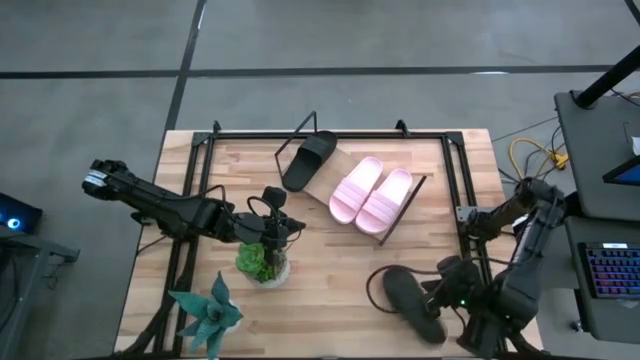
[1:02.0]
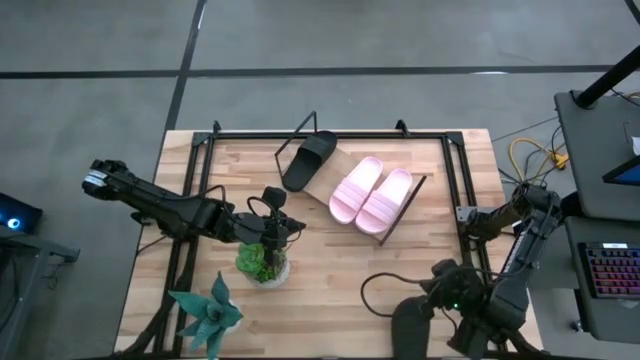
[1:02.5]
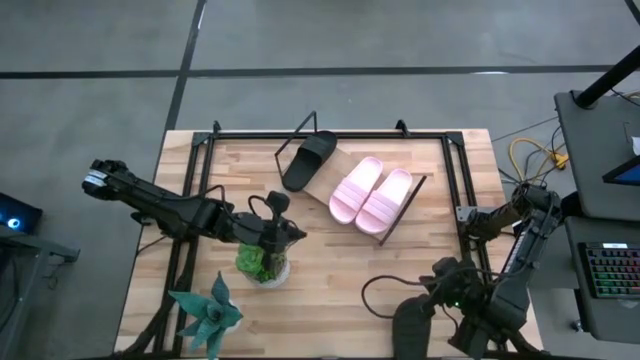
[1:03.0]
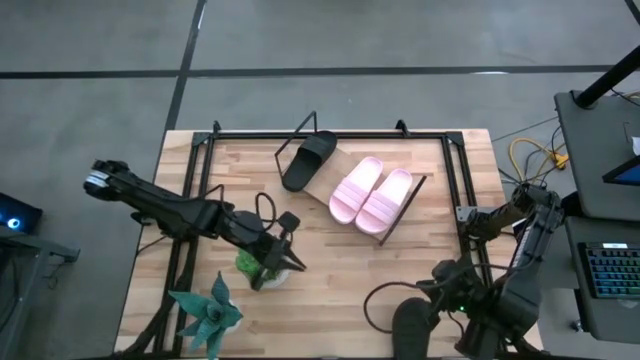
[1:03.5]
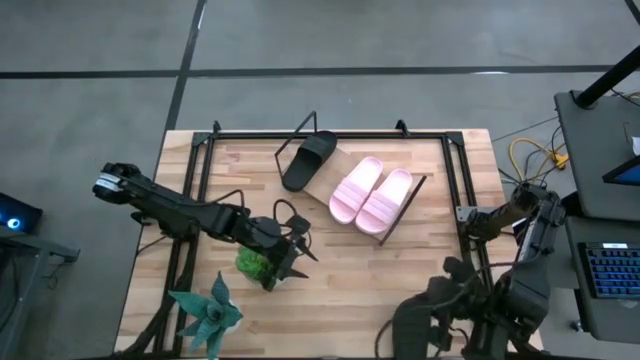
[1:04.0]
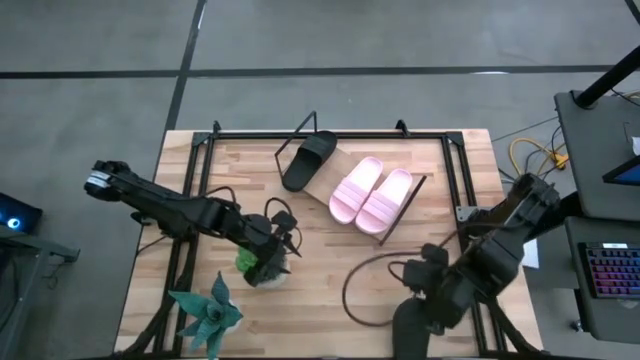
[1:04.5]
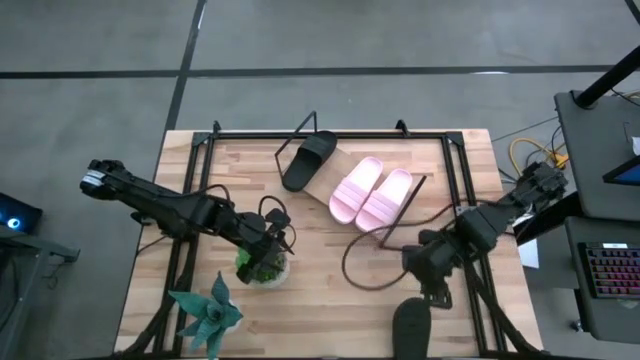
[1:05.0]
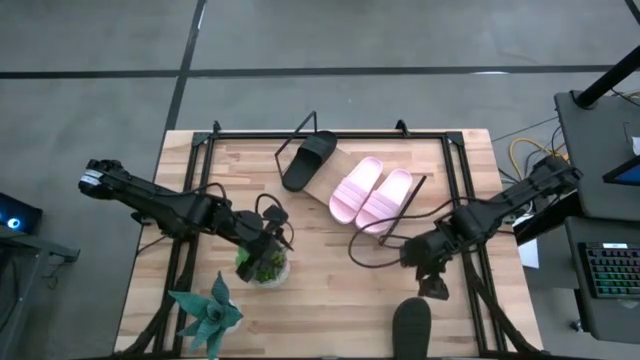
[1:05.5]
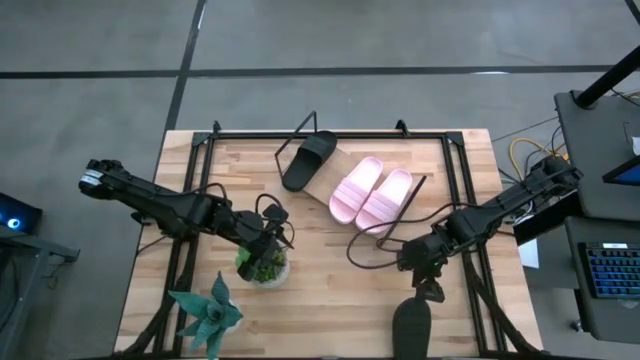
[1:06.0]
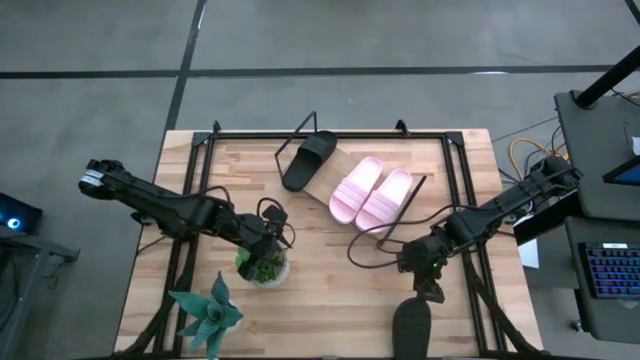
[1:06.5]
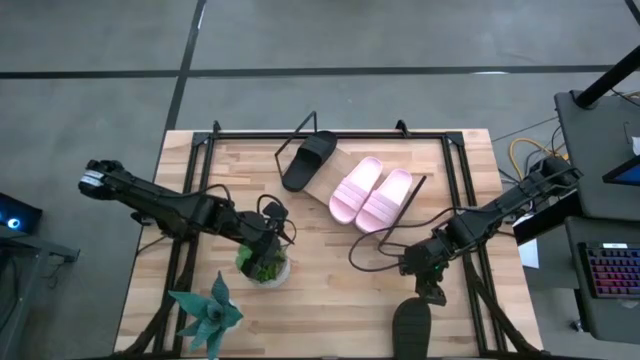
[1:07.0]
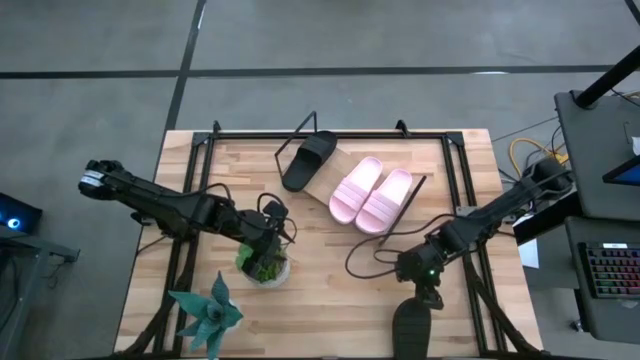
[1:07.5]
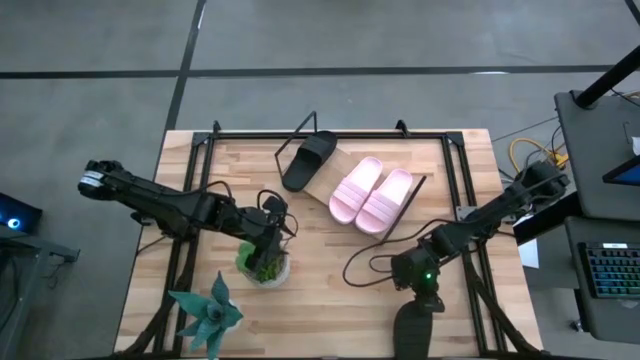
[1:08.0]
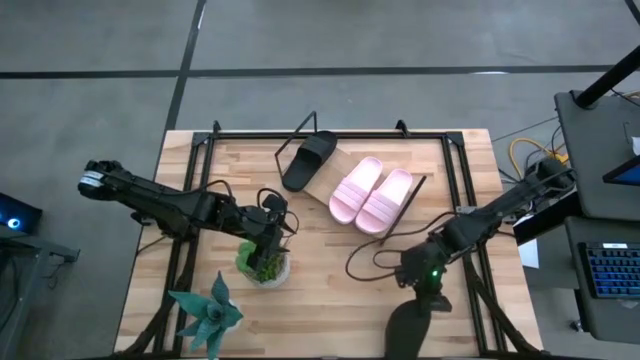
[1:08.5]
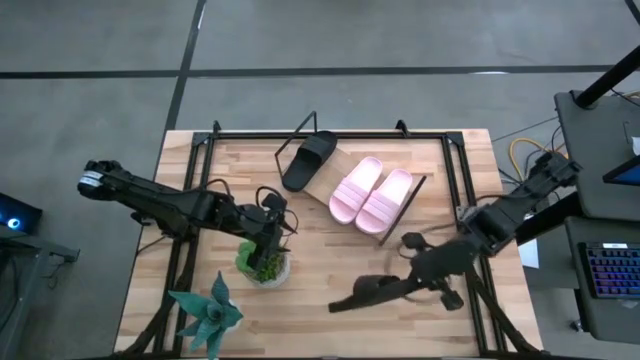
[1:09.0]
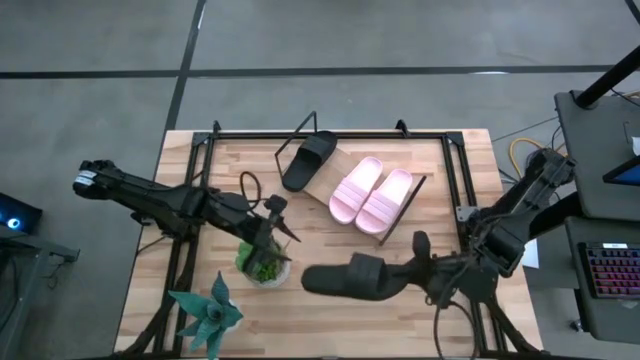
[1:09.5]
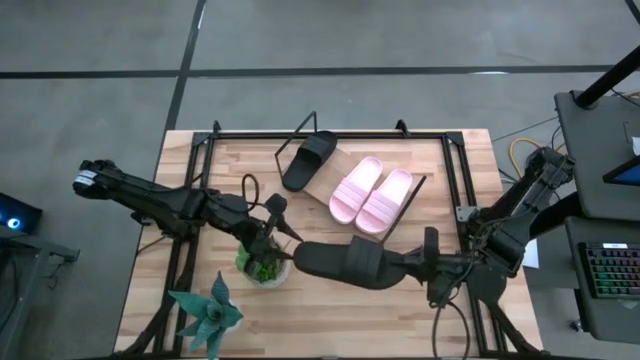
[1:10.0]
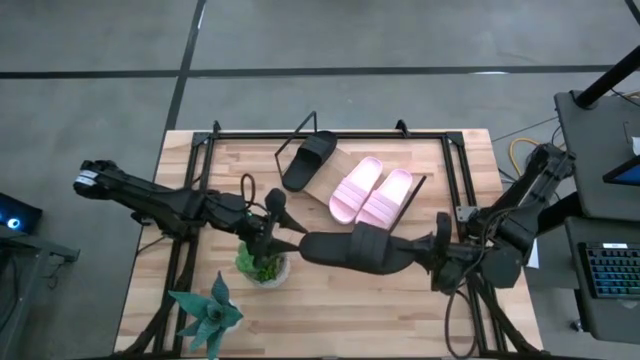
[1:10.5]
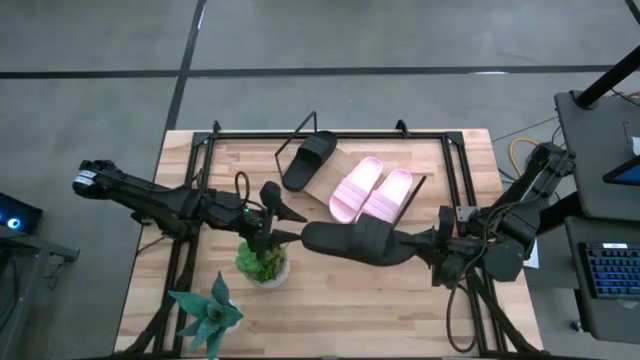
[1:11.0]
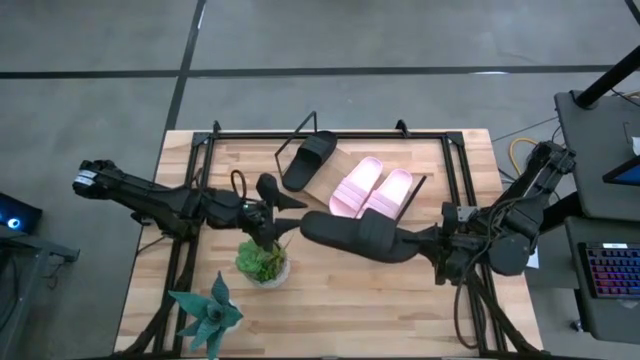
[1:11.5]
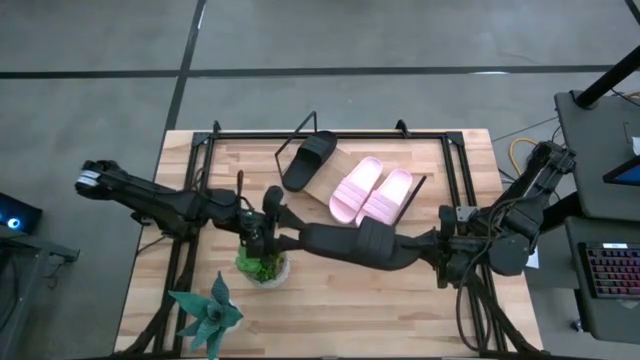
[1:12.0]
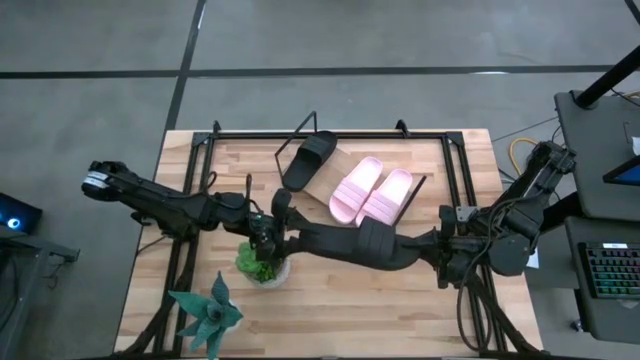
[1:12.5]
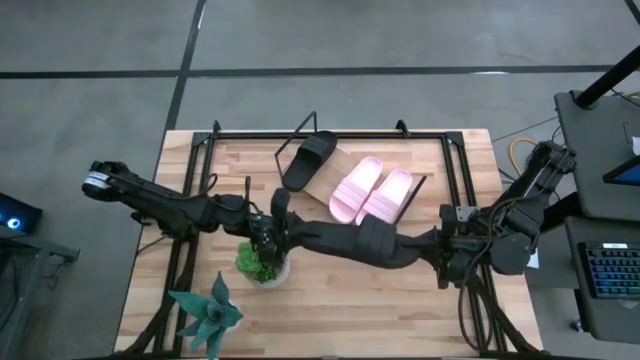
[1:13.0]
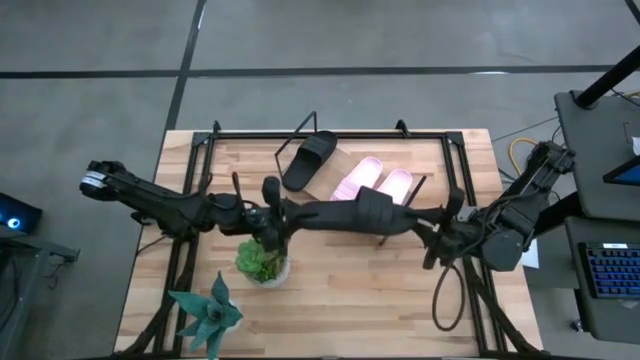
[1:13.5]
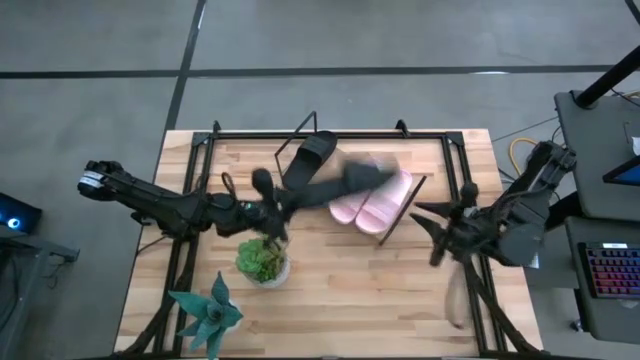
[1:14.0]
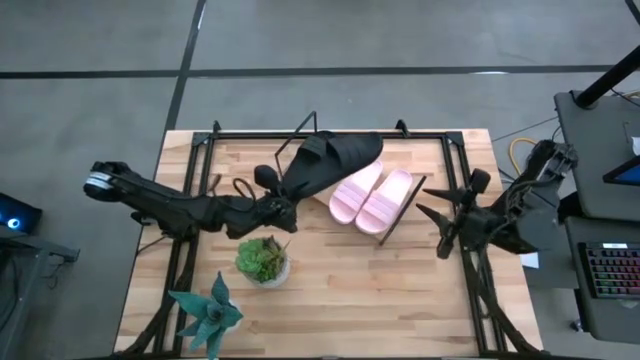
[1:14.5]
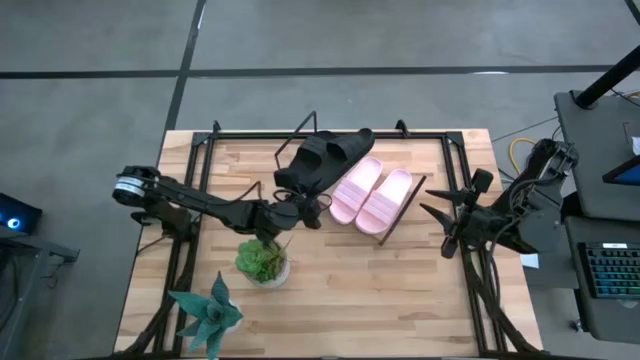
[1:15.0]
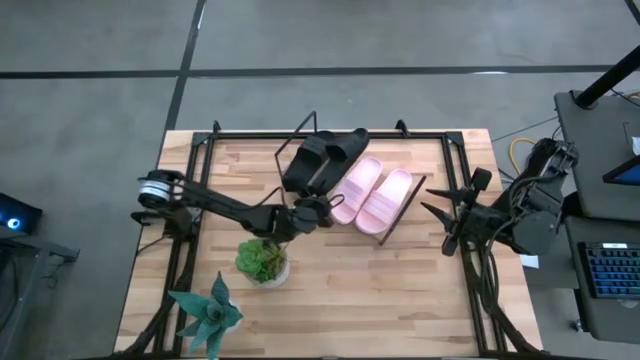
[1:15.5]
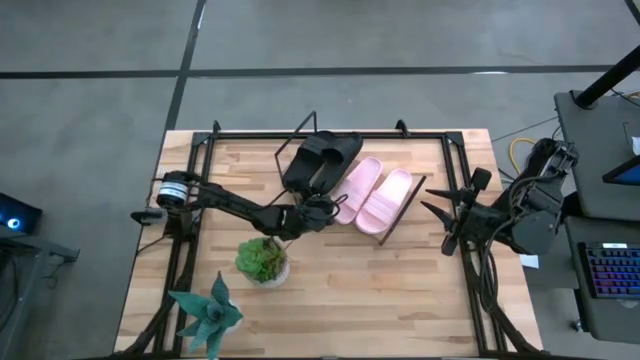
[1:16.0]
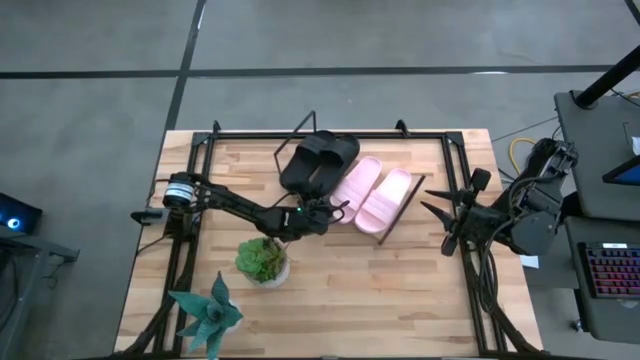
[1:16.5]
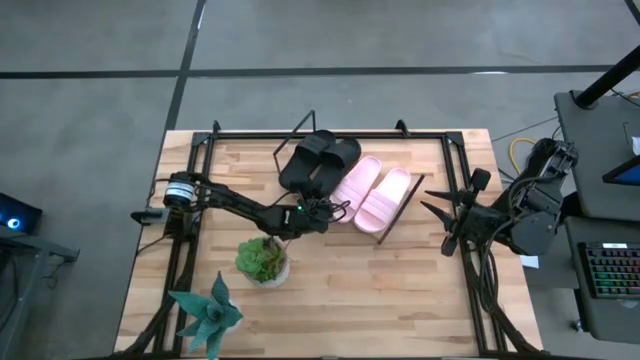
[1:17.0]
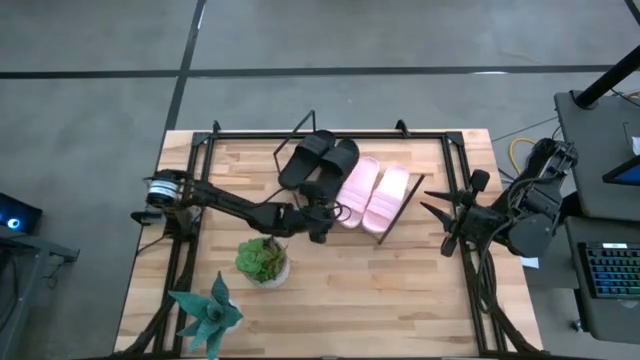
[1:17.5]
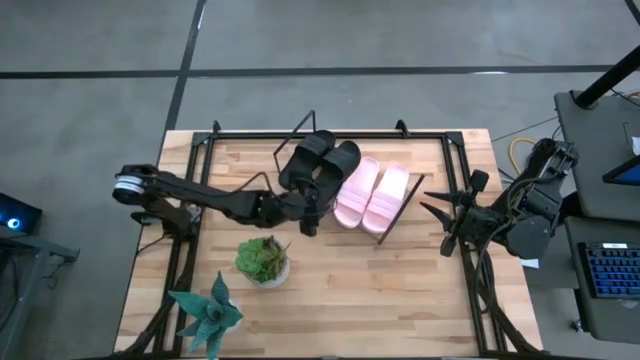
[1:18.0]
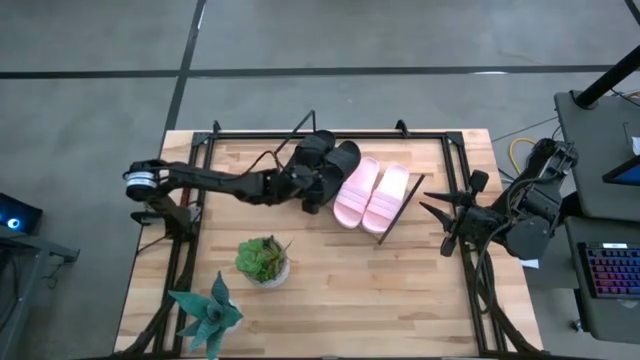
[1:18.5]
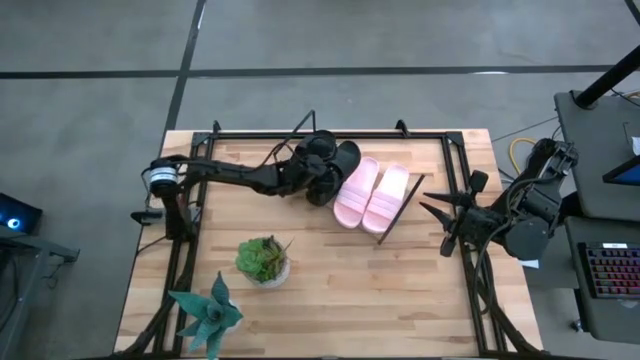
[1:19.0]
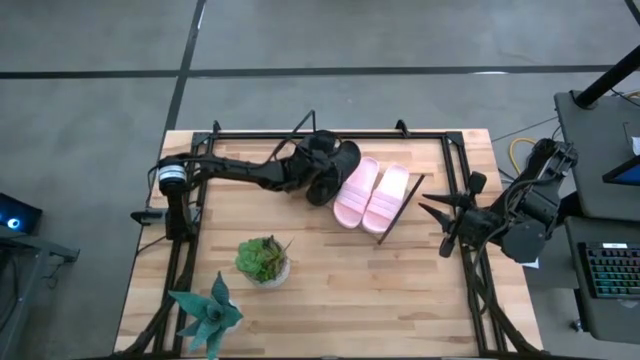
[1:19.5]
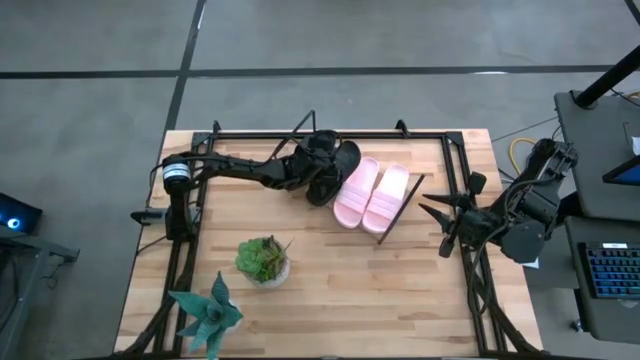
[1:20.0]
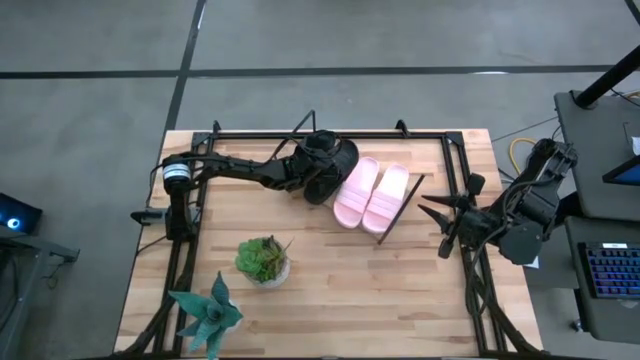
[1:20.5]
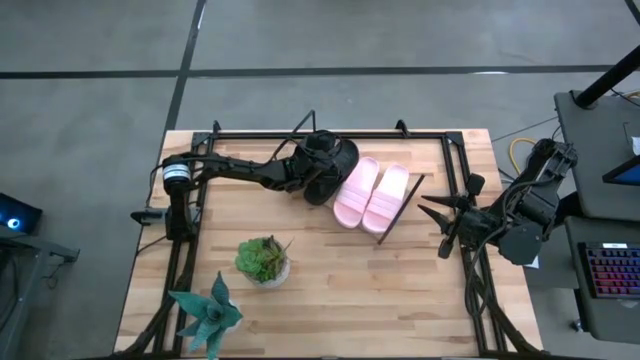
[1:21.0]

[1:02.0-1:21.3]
Task: Pick and place slides into the shelf
Put the black slide on the shelf
